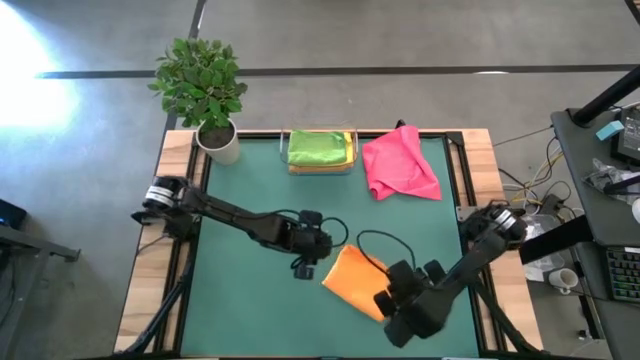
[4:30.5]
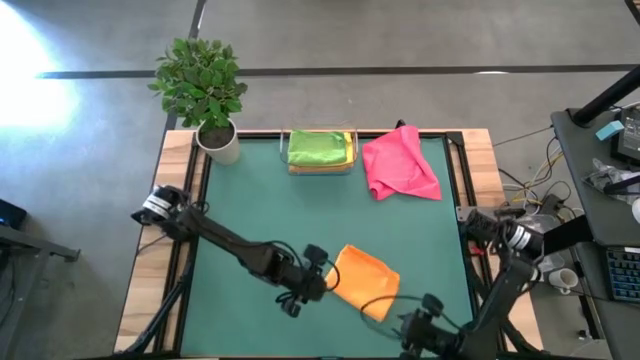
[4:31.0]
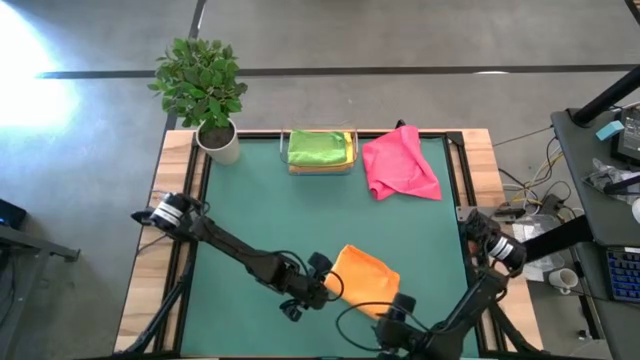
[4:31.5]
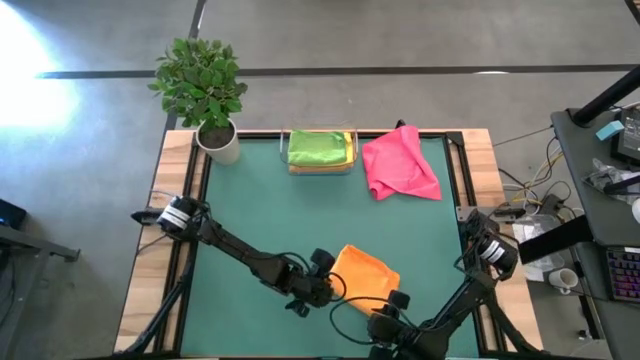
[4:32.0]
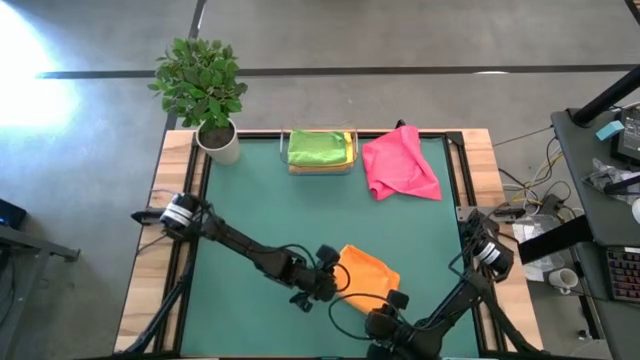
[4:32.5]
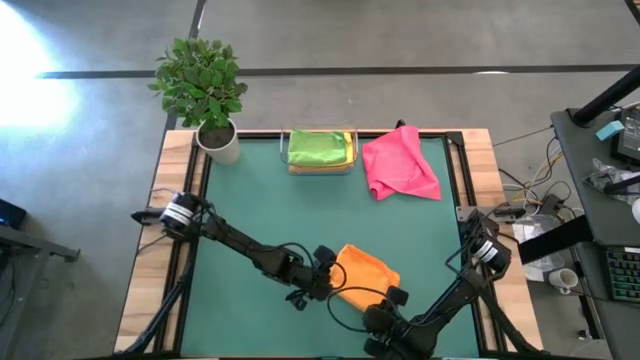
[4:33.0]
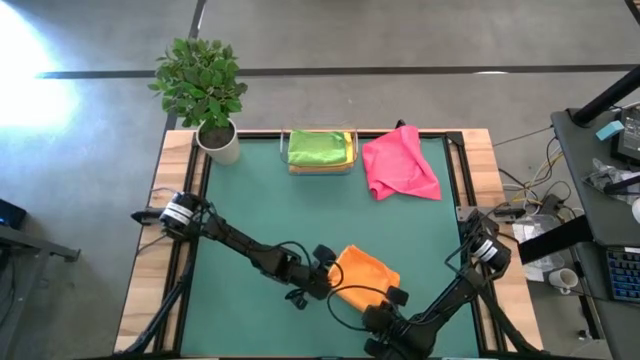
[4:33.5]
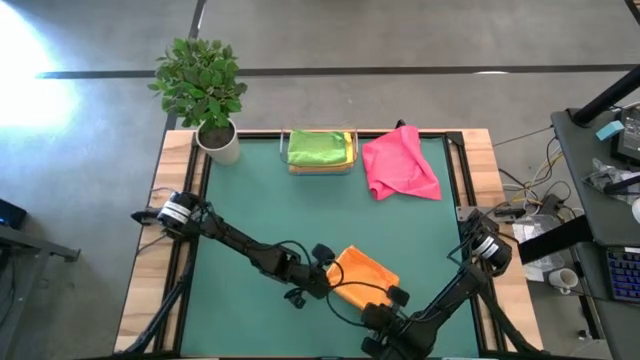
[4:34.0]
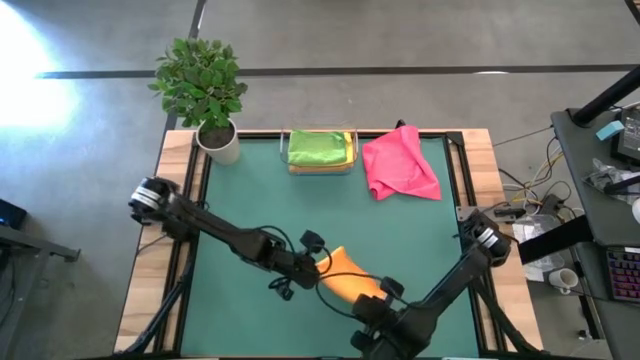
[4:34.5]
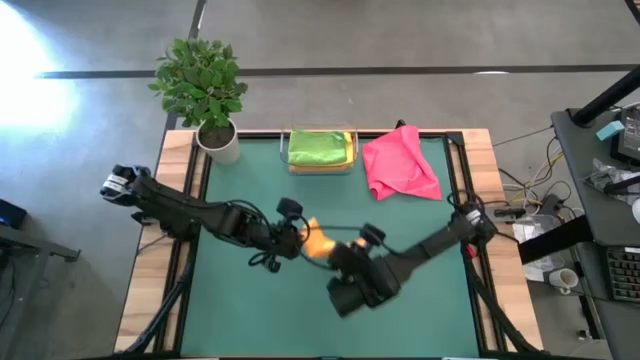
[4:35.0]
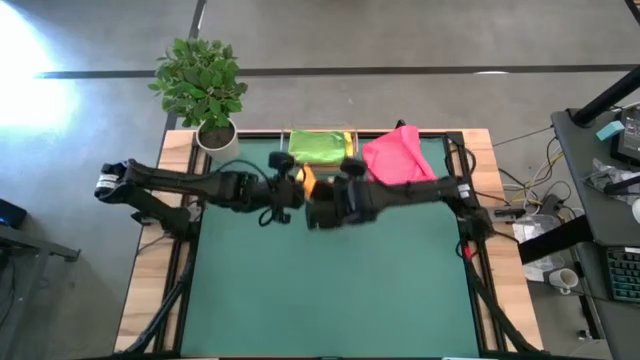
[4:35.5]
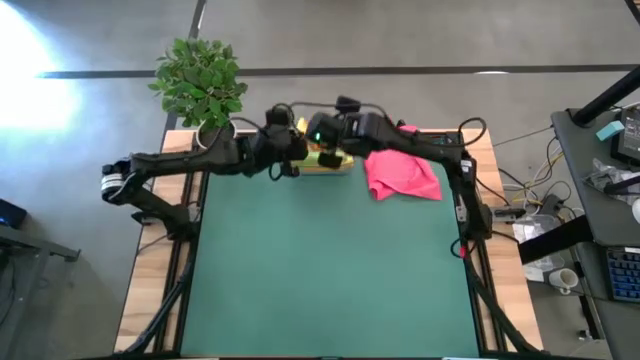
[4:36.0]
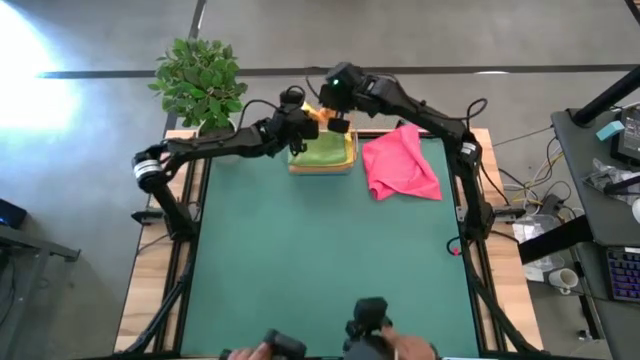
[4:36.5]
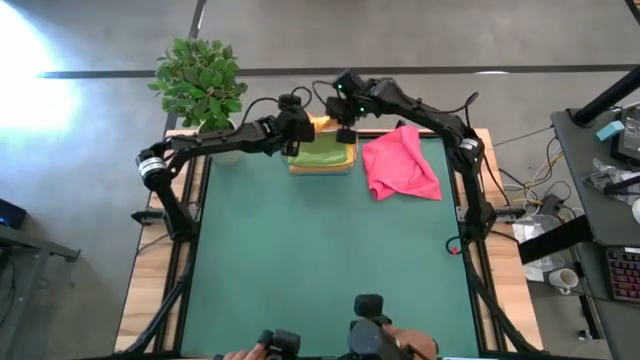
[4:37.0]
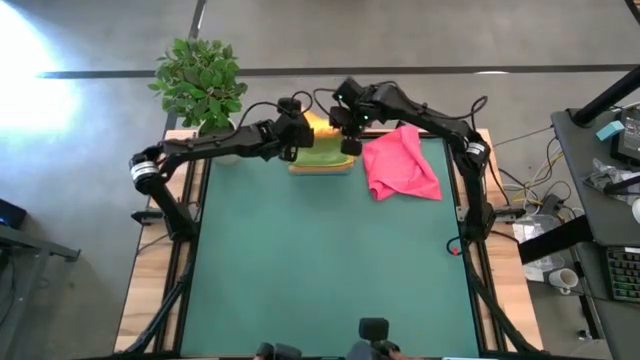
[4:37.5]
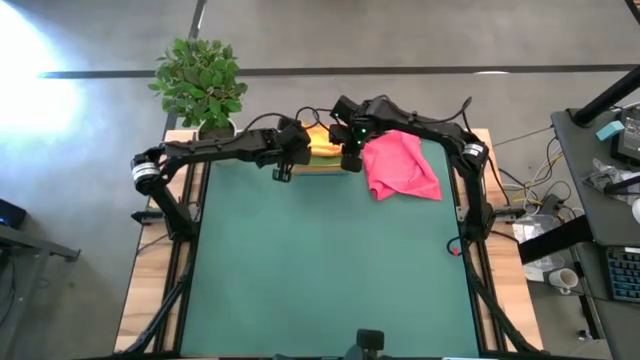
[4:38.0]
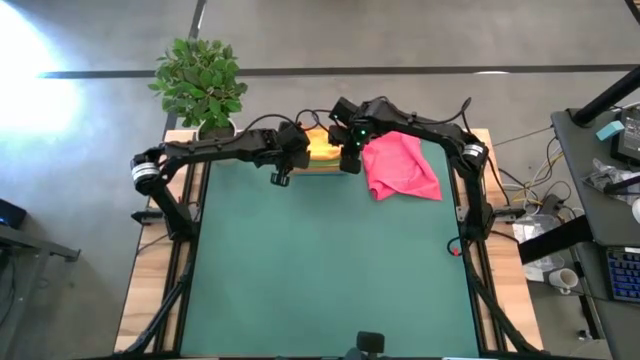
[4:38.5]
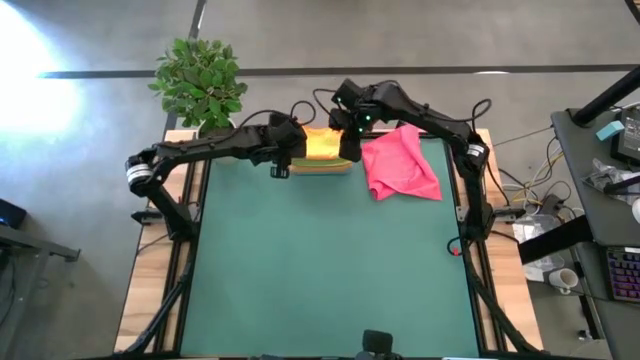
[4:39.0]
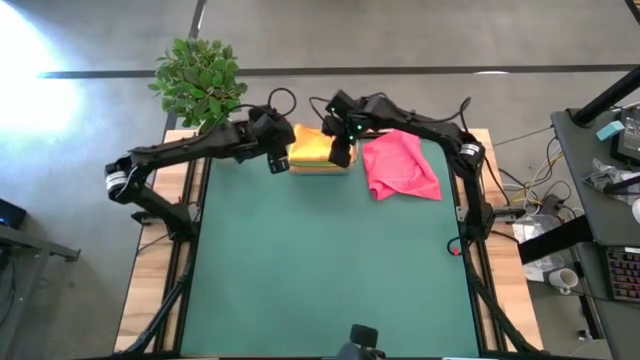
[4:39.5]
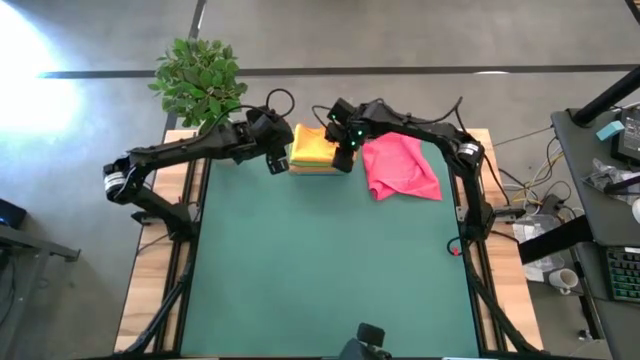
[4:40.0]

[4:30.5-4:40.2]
Task: Fold microfiber towels
Put the folded orange microfiber towel into the transparent bin
